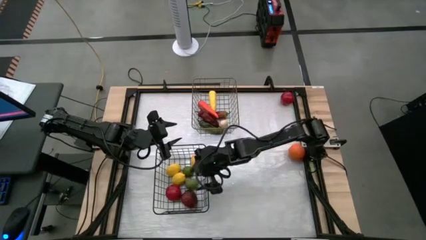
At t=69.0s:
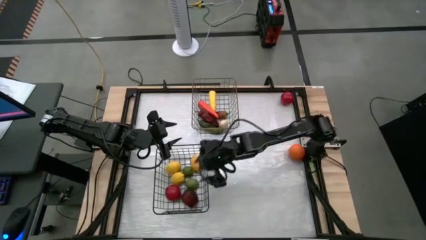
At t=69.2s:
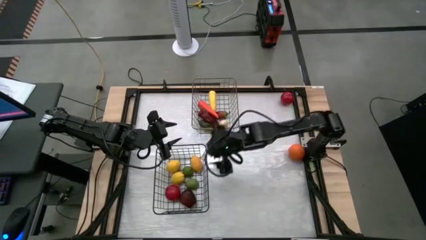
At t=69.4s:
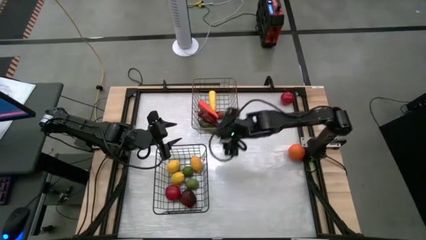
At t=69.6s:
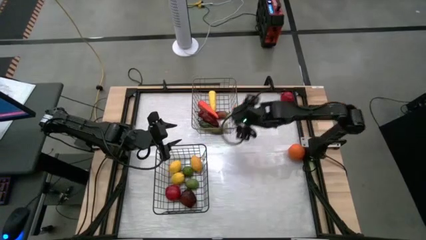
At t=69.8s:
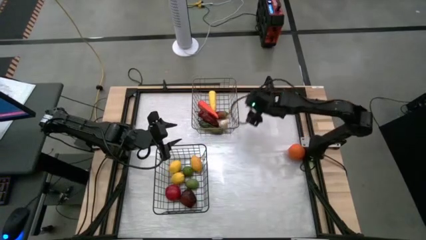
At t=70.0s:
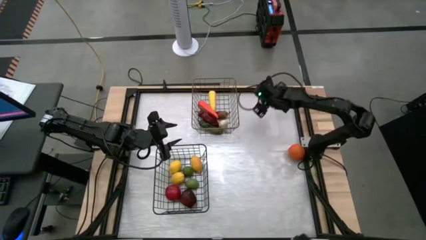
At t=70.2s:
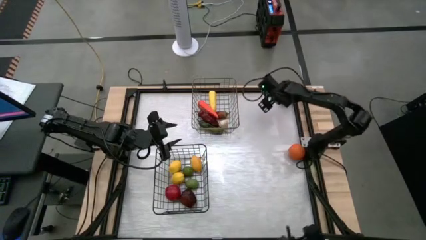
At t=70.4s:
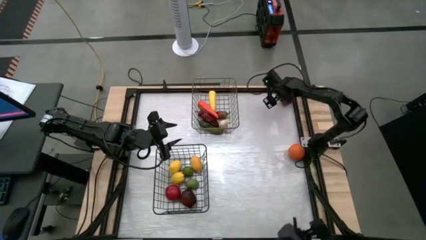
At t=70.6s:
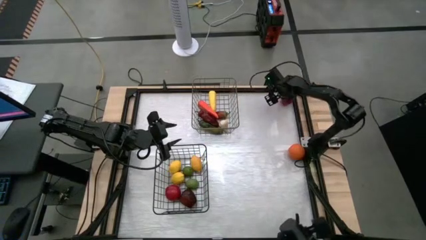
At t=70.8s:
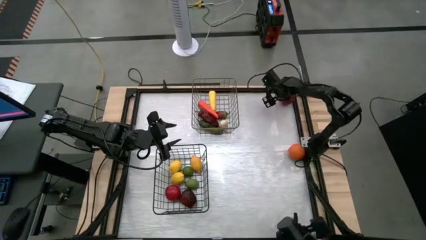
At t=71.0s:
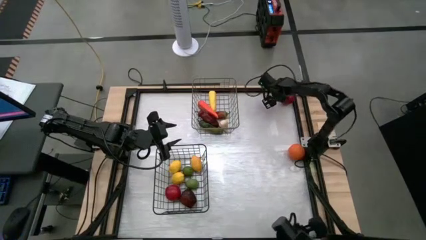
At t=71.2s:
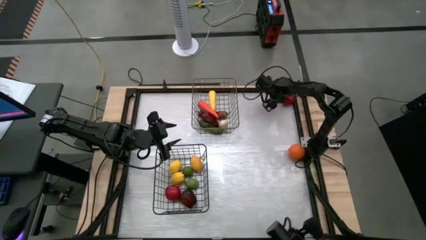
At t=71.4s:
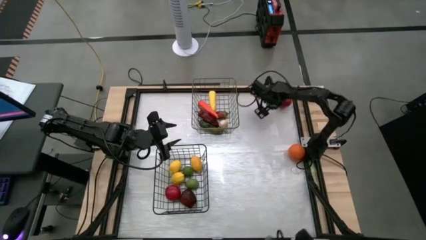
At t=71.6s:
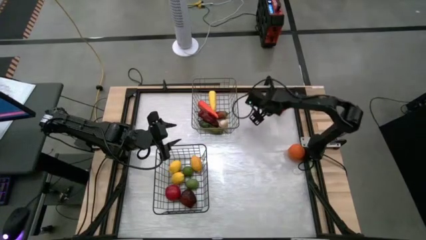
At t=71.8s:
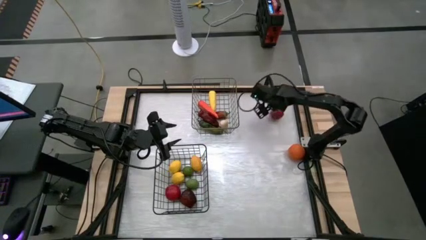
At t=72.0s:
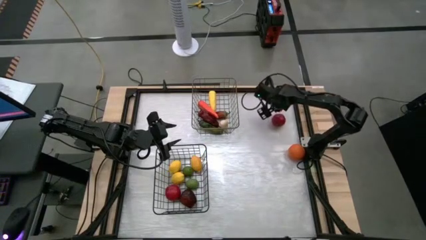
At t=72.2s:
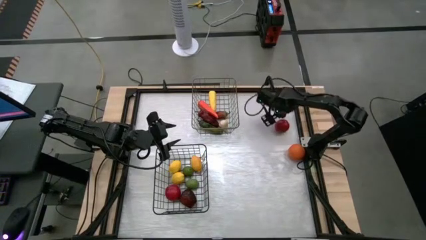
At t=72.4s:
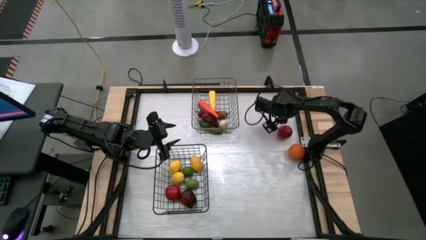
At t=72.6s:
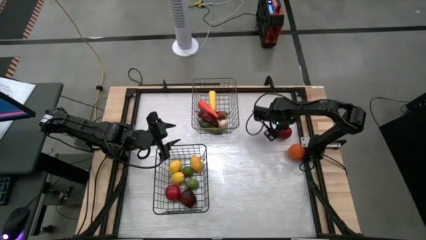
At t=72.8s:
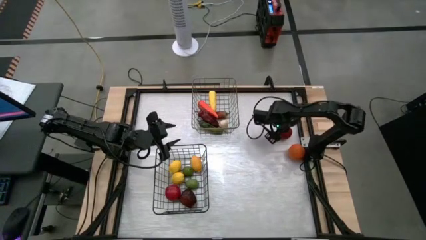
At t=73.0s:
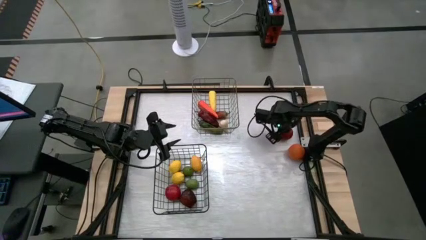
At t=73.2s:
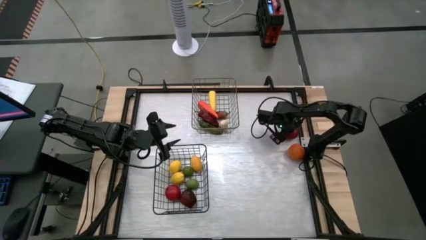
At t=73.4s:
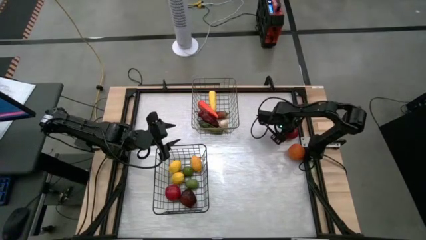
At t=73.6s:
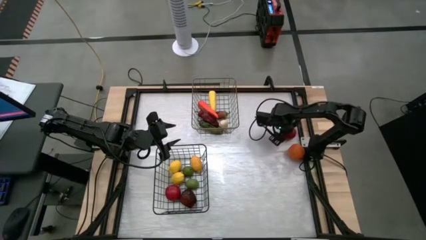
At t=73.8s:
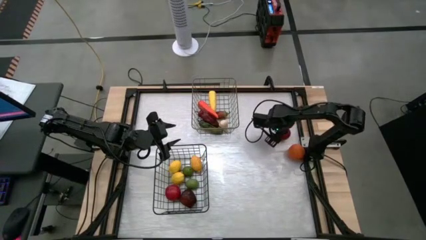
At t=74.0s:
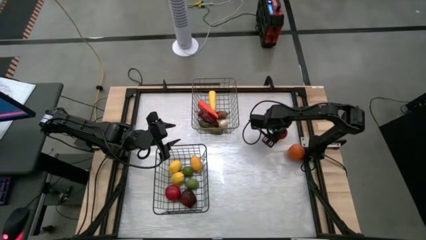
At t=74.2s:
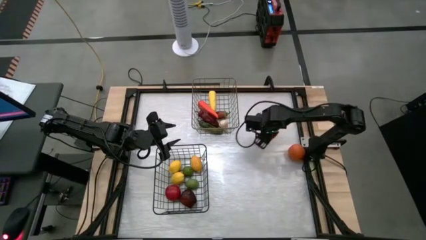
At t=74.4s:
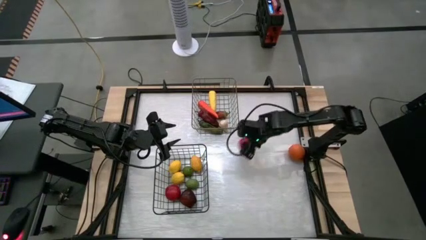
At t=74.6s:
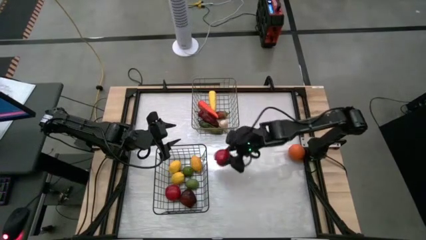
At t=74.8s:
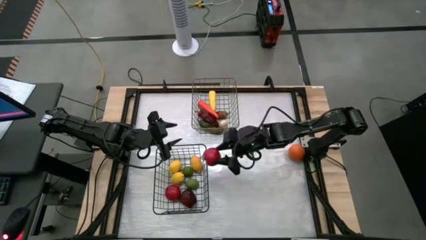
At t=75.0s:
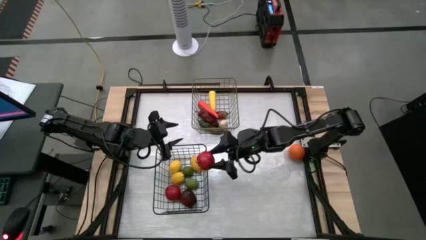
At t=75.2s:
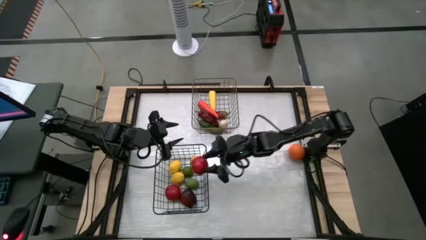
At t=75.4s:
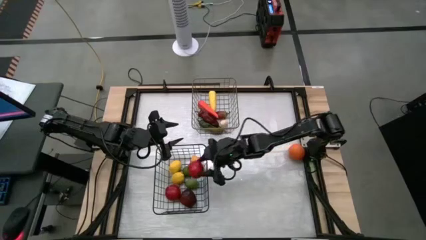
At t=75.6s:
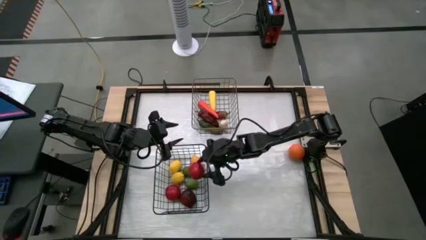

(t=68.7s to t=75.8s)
Task: Sort produce into baskets
Put the tomato into the black wire basket

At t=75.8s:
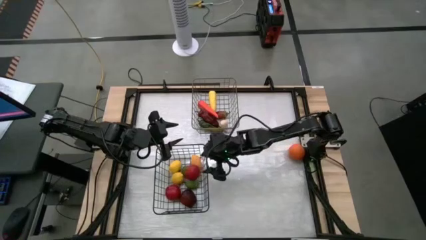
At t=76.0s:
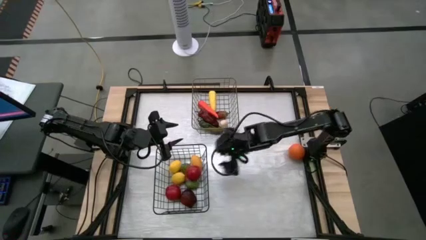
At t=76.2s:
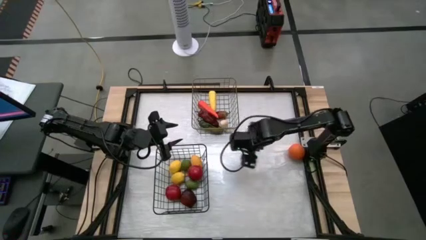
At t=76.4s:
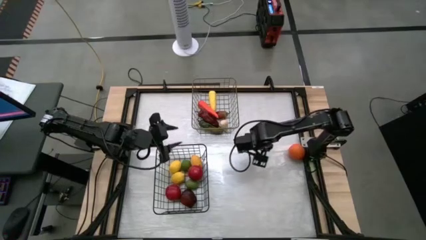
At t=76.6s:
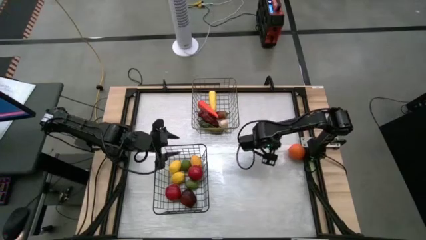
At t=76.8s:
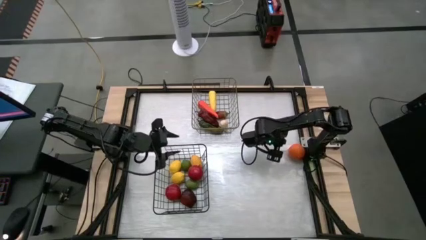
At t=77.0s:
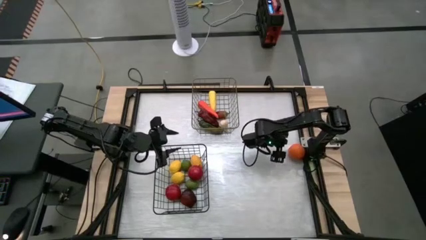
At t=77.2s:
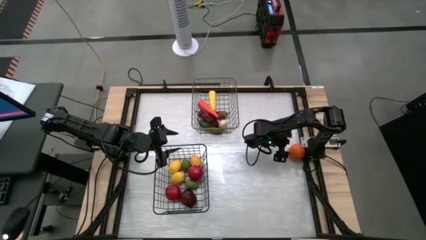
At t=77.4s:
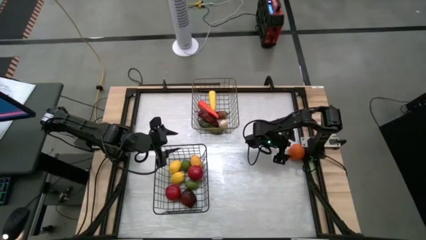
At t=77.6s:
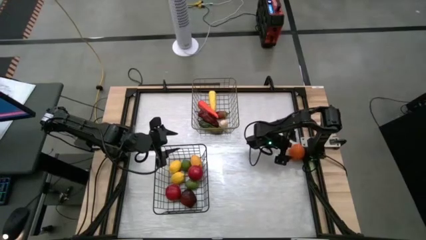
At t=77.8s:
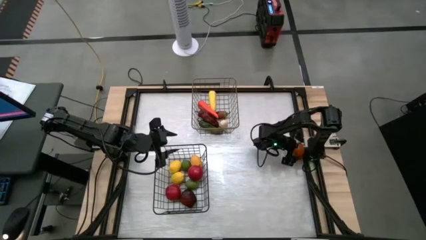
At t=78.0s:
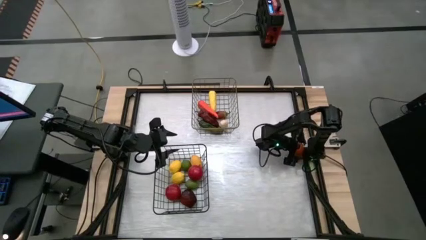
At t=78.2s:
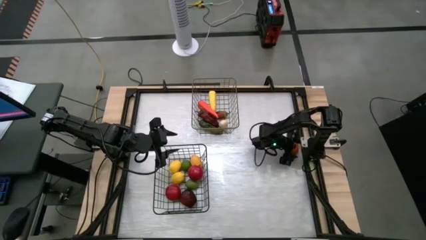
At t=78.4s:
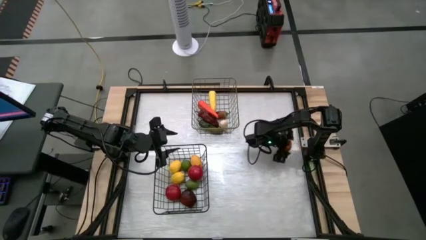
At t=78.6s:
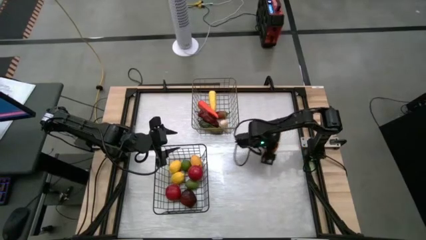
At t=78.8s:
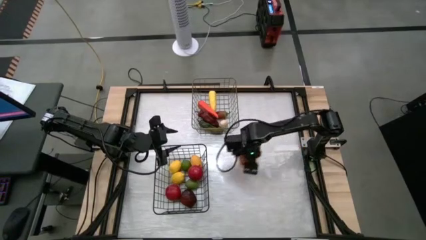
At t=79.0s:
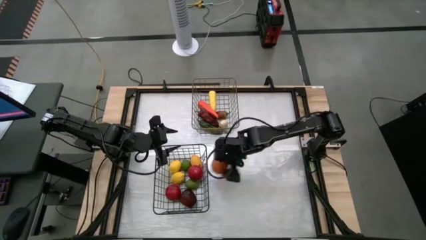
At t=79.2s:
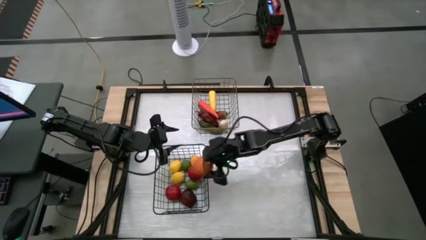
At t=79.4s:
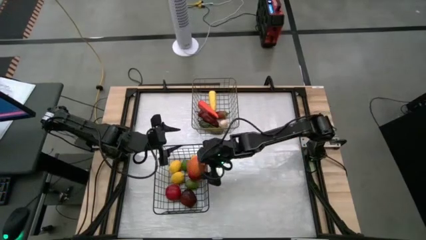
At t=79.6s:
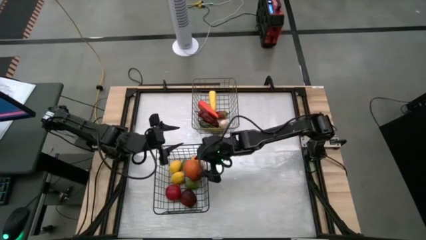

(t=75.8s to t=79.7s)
Put the orange into the black wire basket

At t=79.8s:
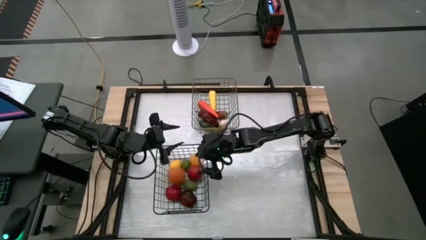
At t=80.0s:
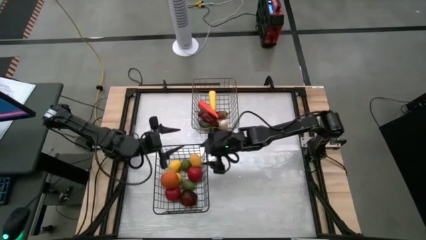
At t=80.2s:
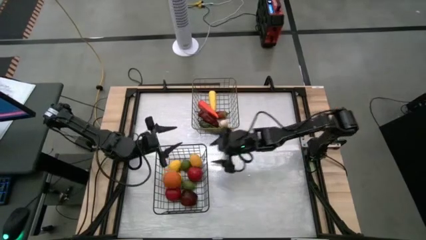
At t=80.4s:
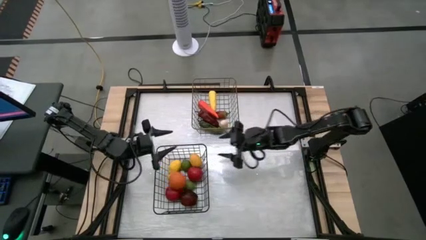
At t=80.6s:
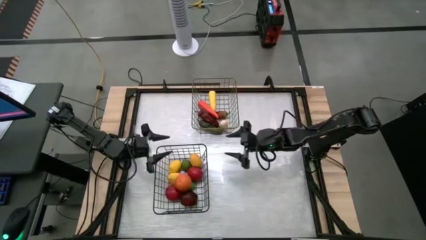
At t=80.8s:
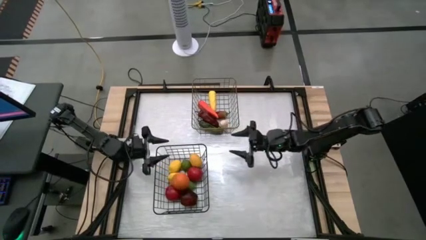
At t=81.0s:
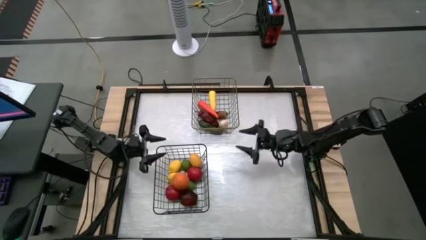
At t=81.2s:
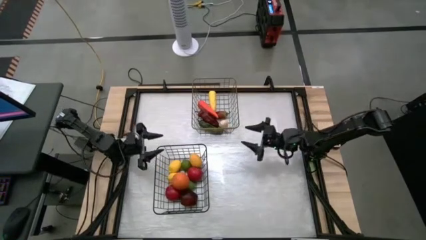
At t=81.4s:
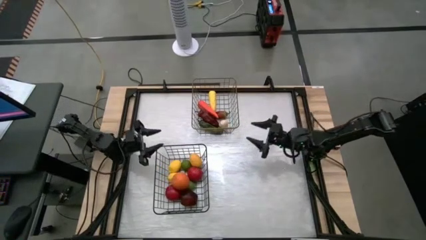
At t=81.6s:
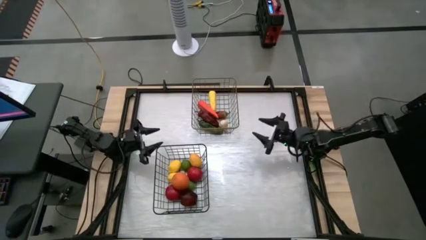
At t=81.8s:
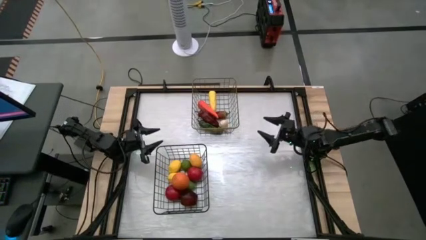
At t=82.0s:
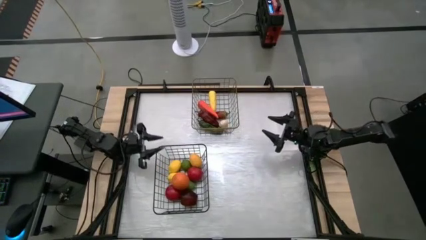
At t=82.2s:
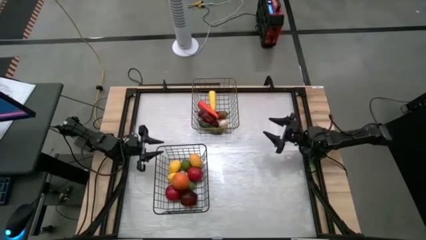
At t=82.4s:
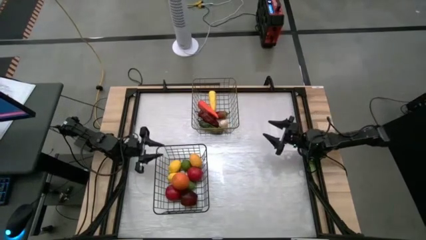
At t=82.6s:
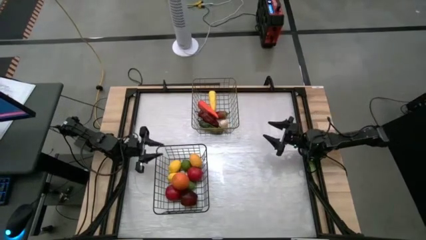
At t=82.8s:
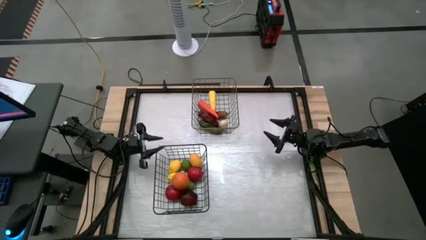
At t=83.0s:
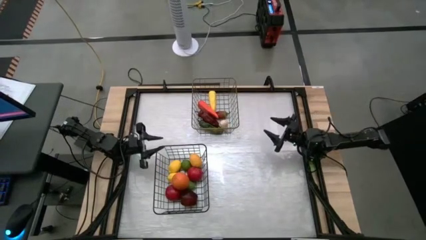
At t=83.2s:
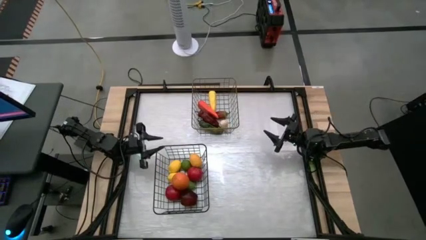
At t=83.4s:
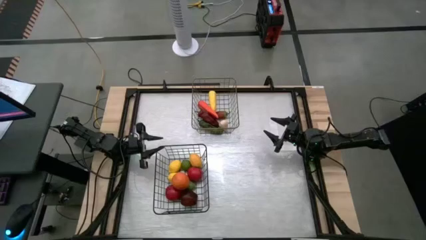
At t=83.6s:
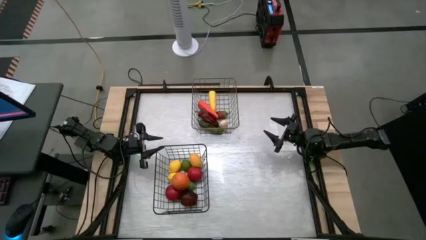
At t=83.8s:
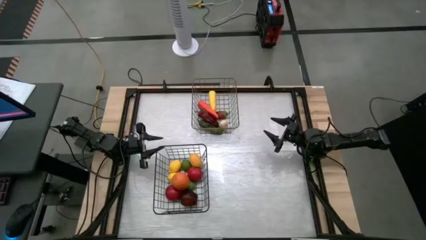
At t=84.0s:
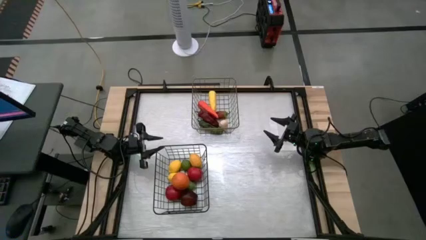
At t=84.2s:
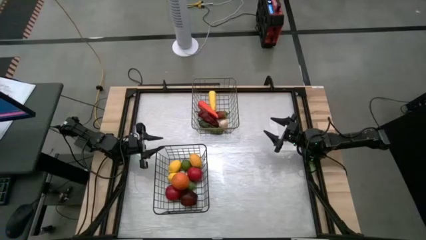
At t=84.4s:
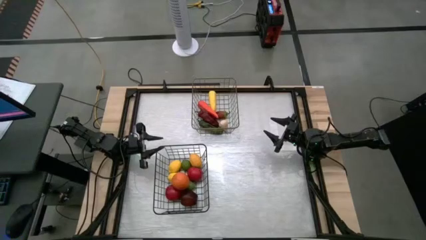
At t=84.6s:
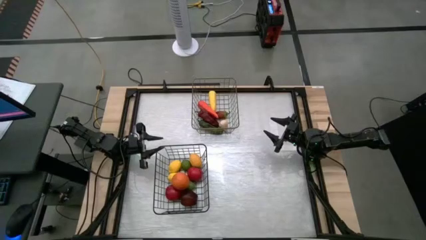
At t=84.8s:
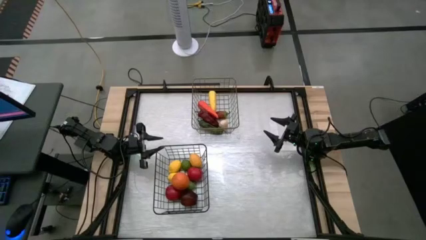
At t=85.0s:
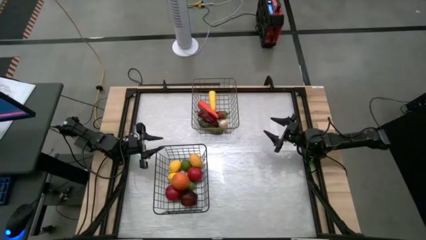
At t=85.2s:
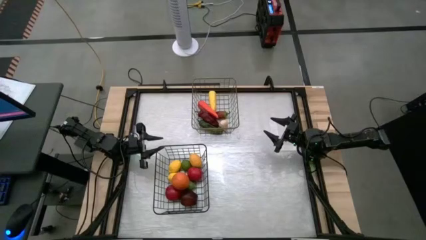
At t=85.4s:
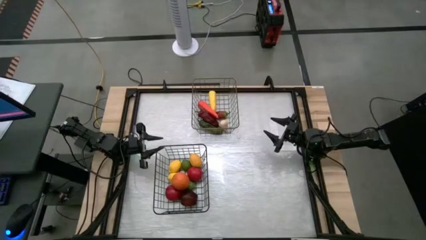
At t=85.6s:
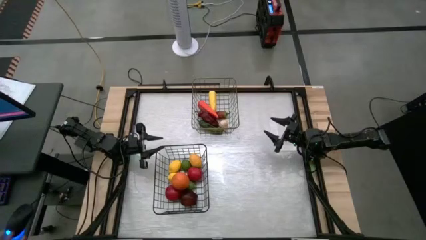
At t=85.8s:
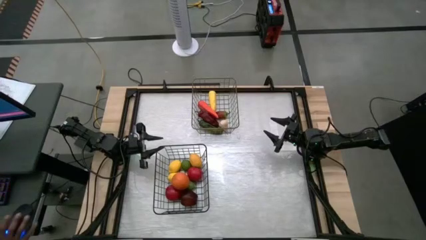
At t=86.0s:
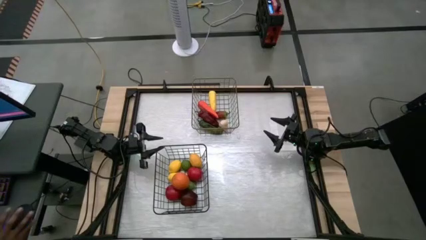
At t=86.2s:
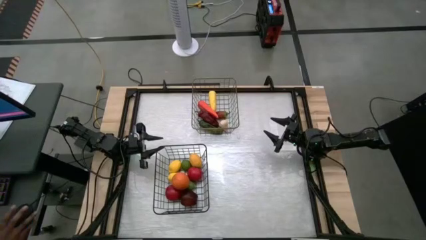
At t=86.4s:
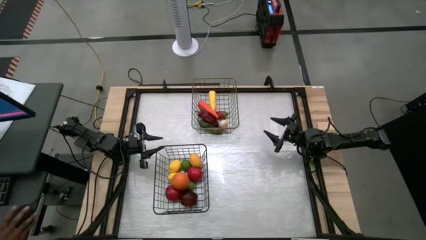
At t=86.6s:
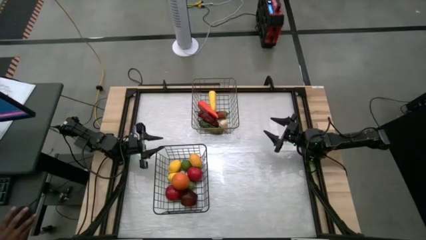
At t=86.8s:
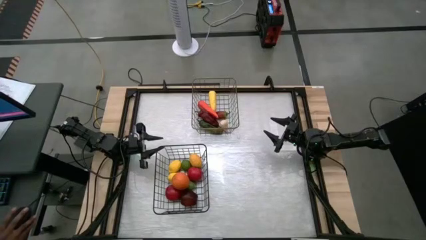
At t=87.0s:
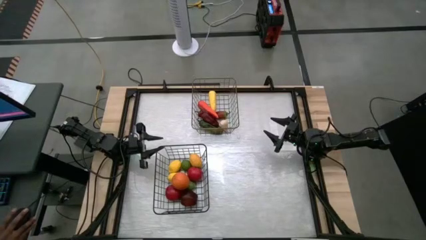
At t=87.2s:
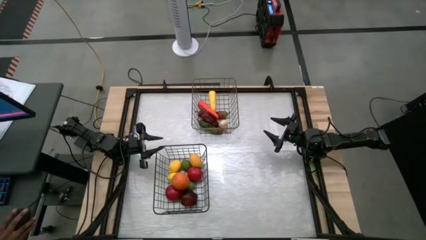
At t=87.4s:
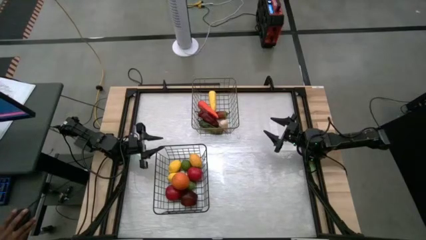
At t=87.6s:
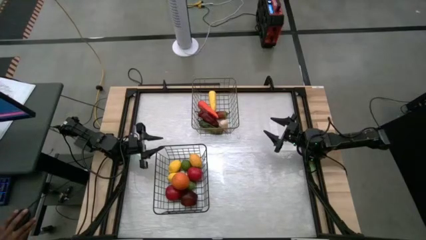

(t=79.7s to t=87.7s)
Return to Home Position
